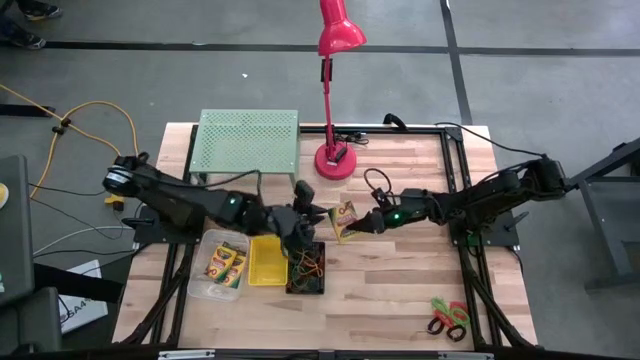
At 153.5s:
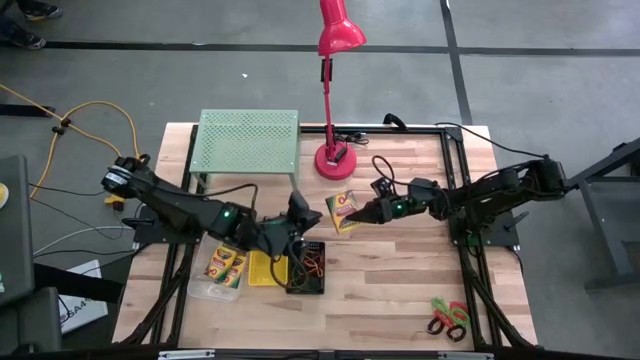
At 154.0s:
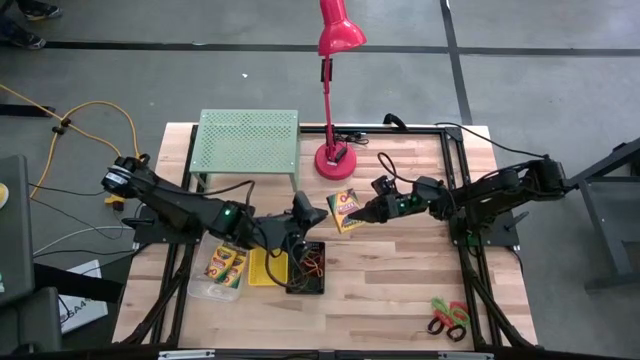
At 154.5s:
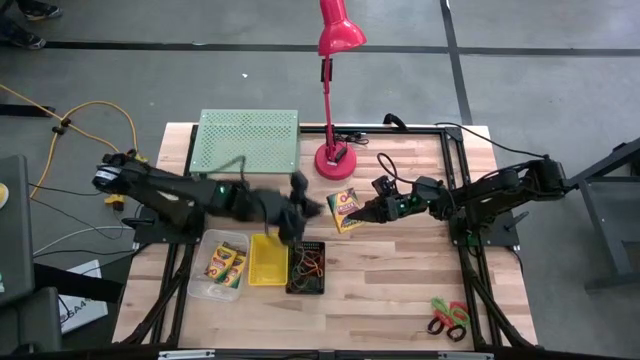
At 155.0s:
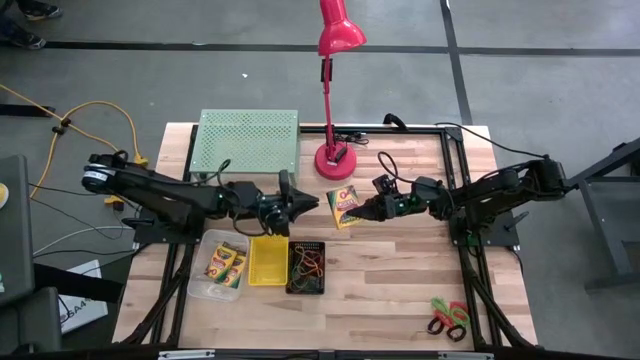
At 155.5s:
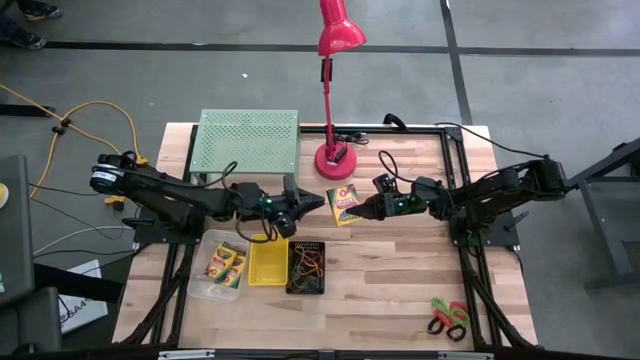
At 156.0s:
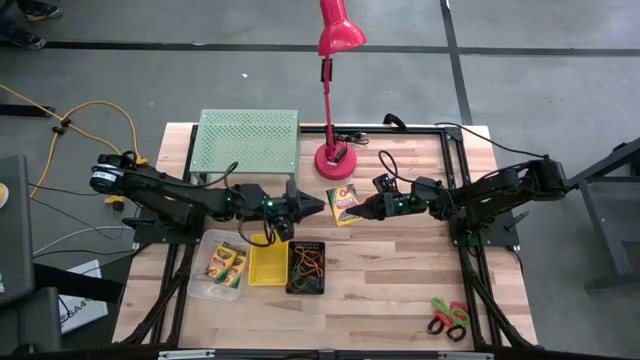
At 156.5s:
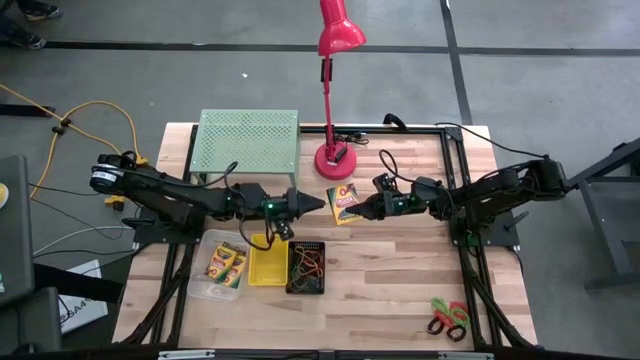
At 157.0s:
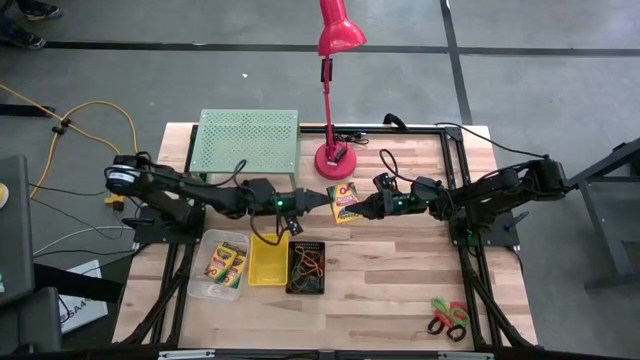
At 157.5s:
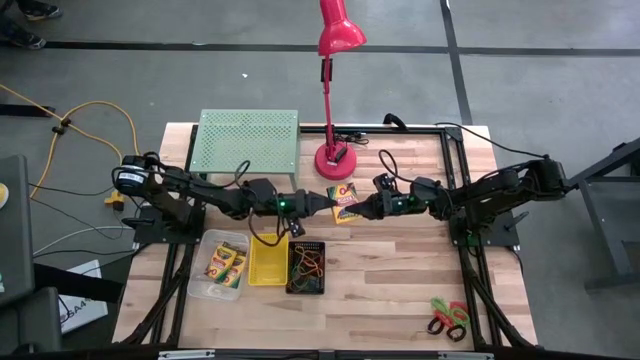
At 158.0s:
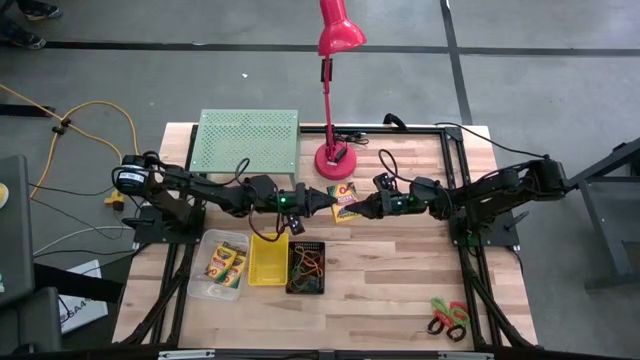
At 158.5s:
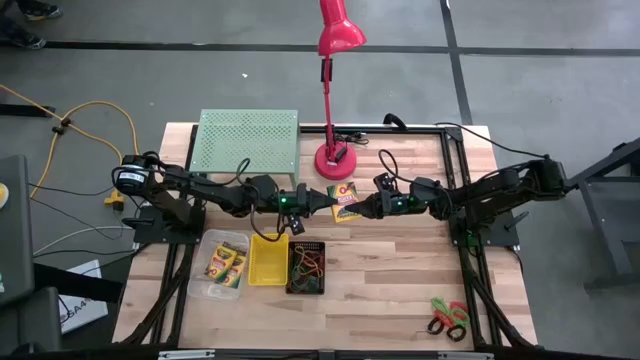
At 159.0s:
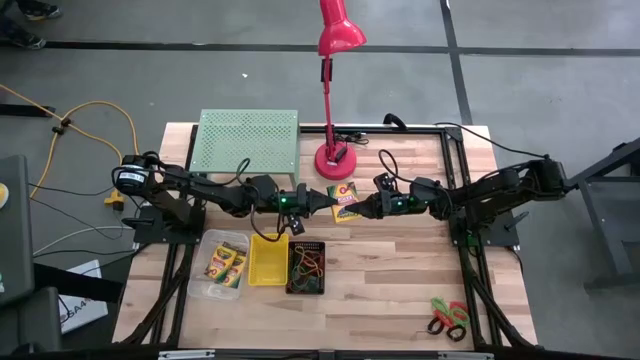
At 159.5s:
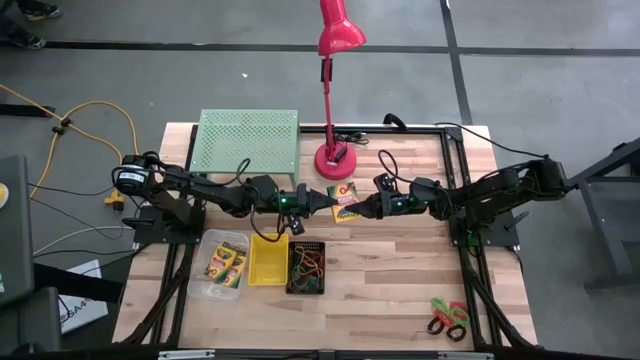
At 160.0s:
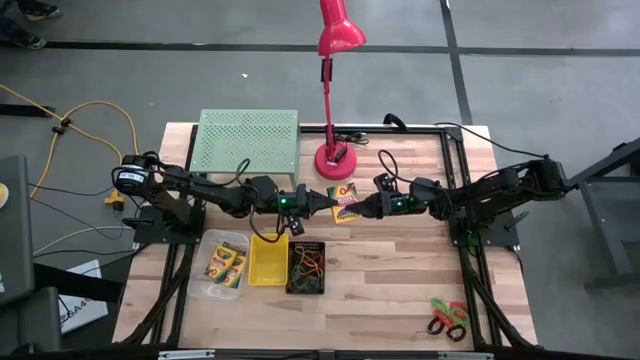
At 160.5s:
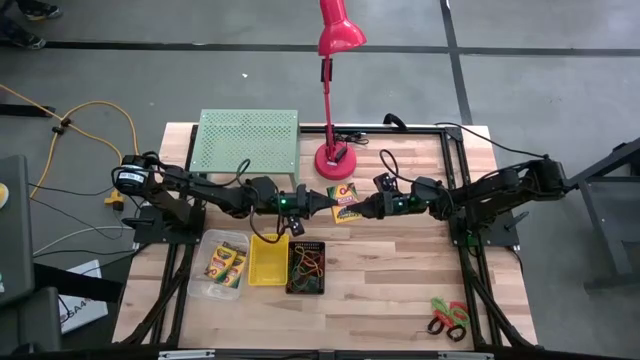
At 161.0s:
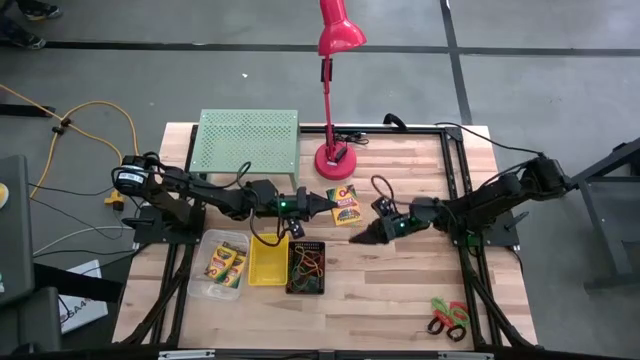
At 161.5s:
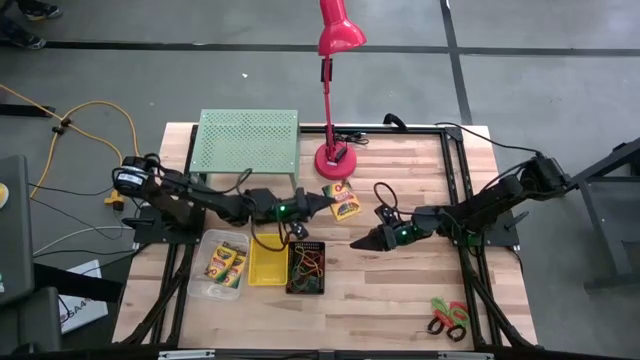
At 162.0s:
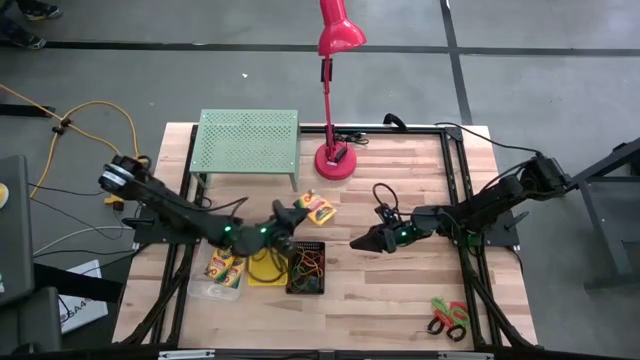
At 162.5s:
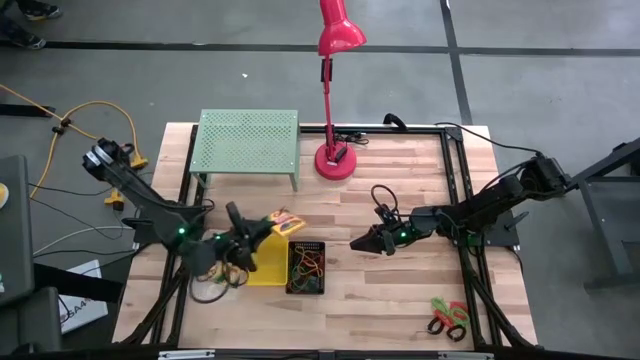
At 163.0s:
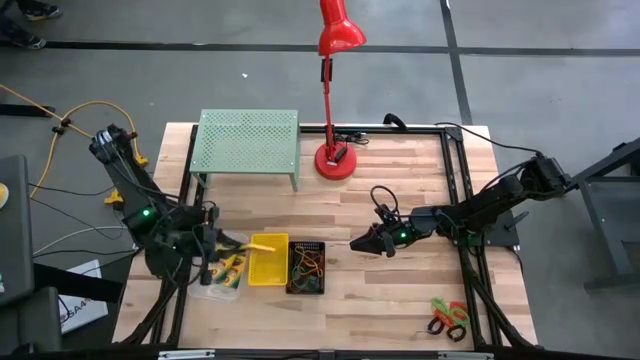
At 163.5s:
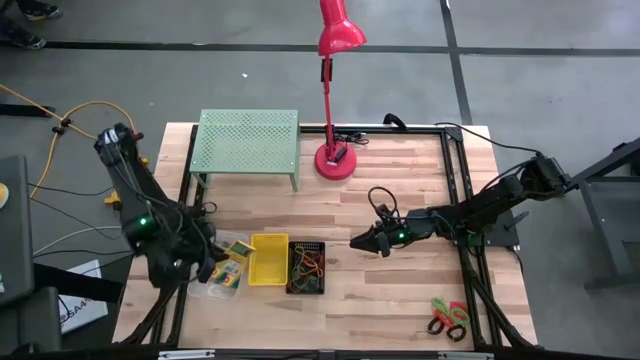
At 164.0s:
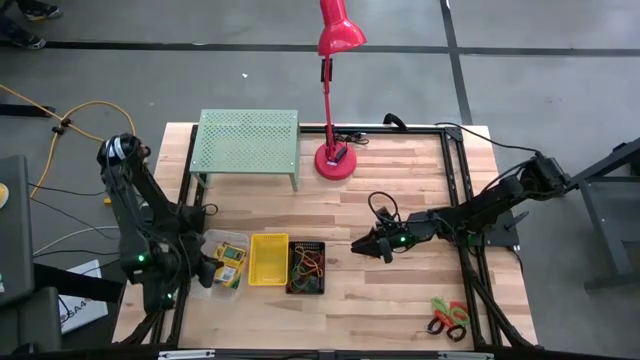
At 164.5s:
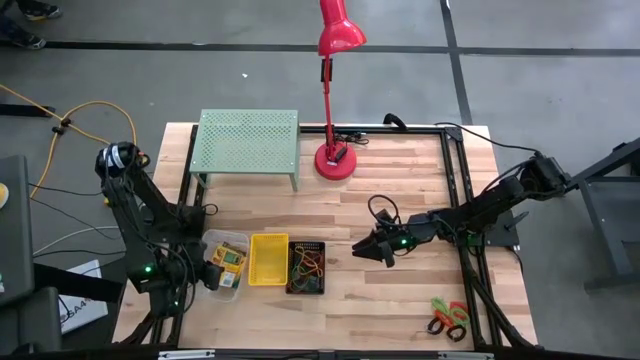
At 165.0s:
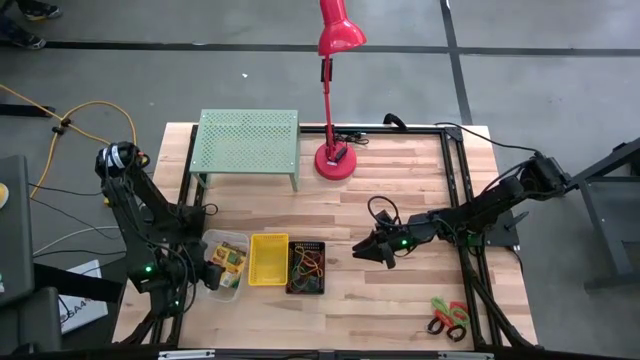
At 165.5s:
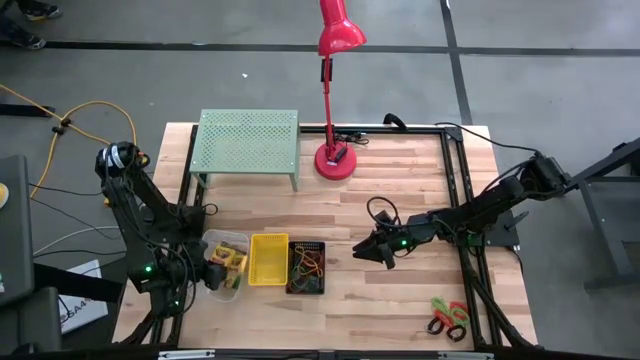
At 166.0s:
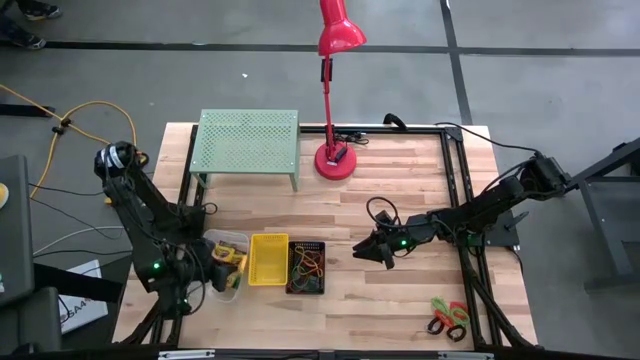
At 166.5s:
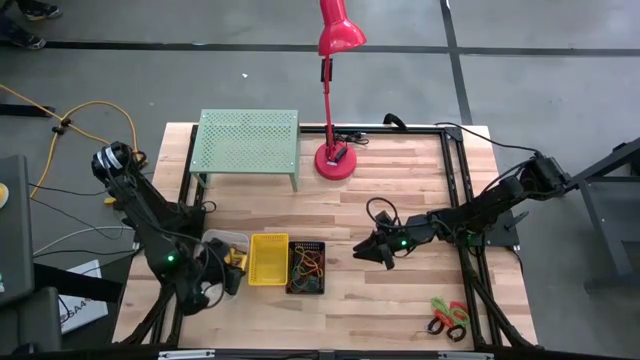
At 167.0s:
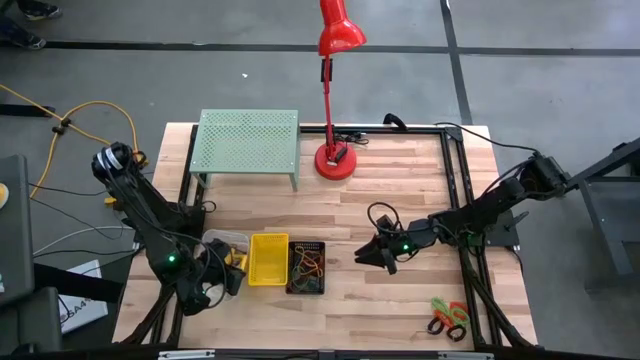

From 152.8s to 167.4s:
Task: Pick & Place Office Desk Supplies
Put the crayon box into the transparent box

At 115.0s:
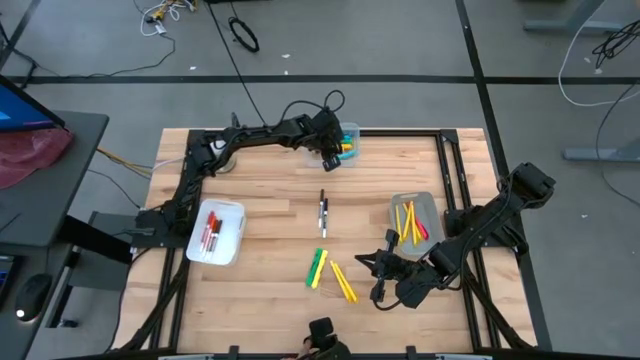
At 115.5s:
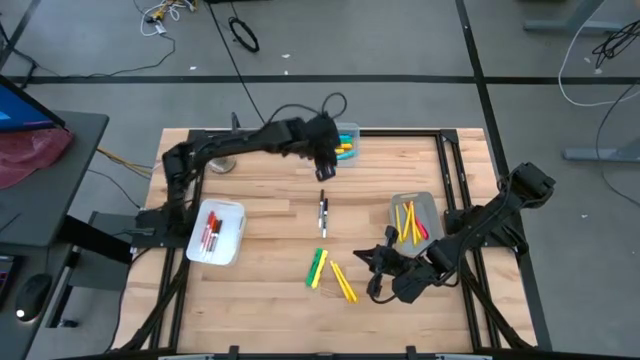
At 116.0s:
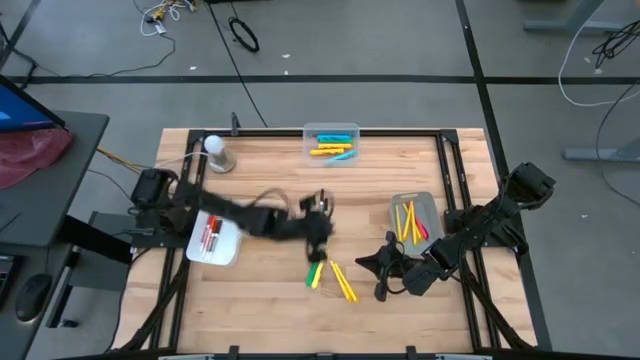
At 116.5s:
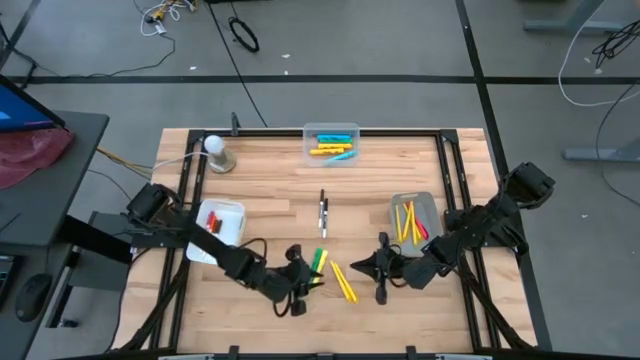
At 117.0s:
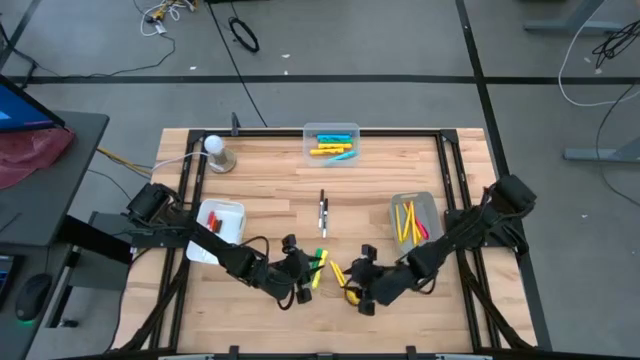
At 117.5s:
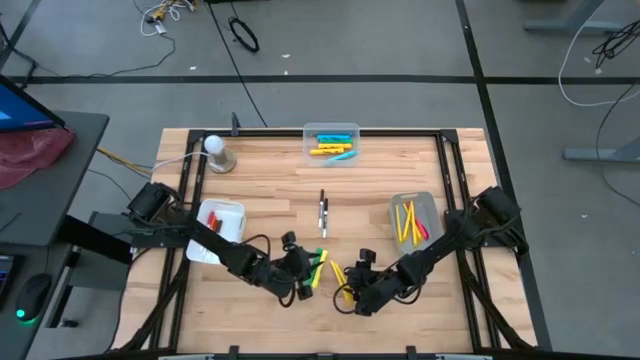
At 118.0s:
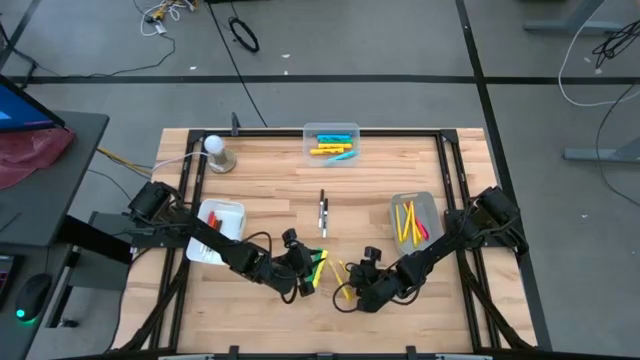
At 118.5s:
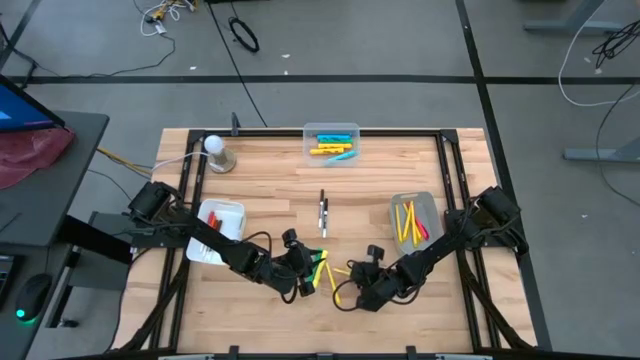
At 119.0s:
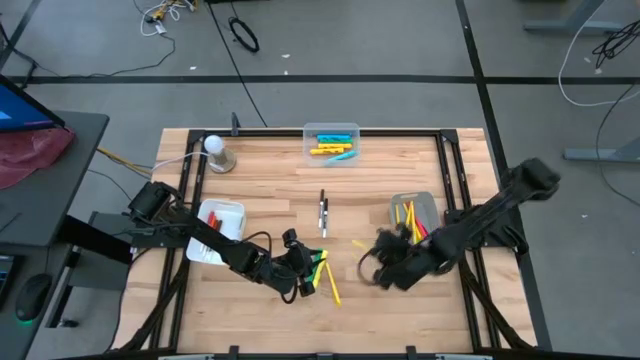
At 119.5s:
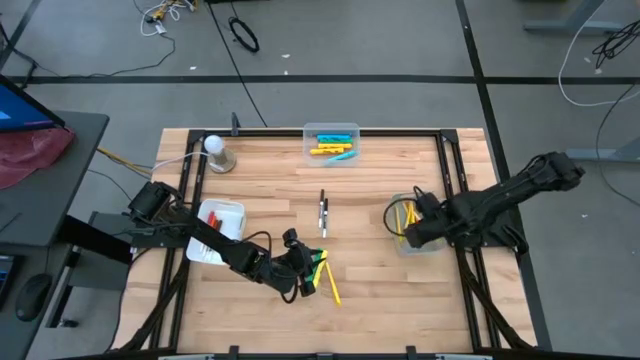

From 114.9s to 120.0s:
Task: Pick & Place Markers
Put the yellow pen into the gray bin

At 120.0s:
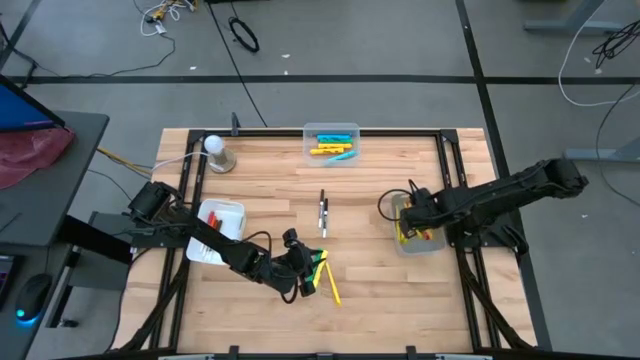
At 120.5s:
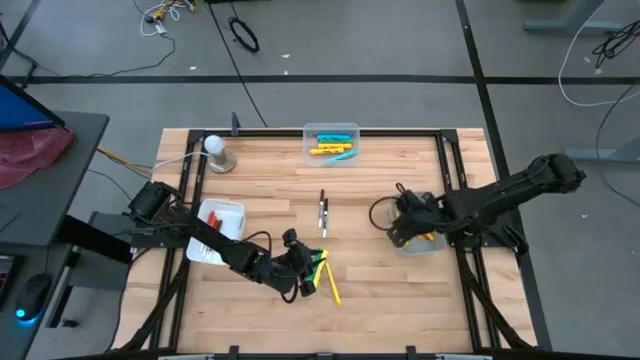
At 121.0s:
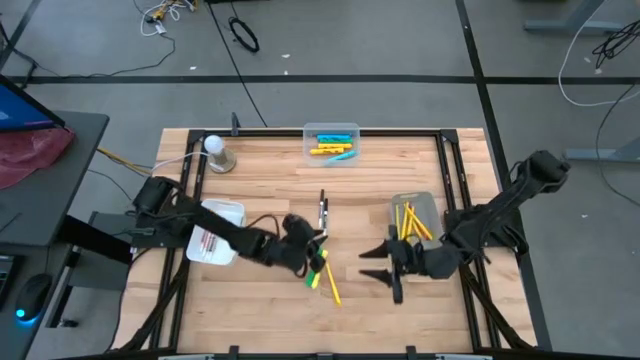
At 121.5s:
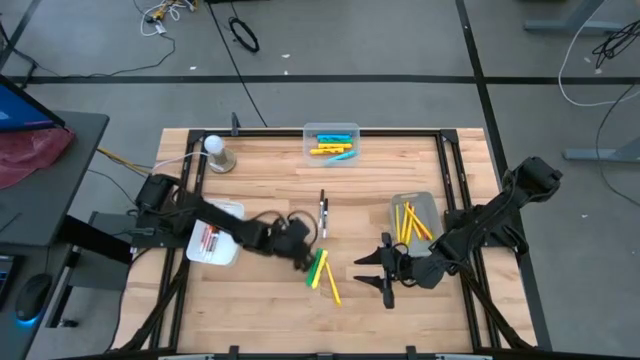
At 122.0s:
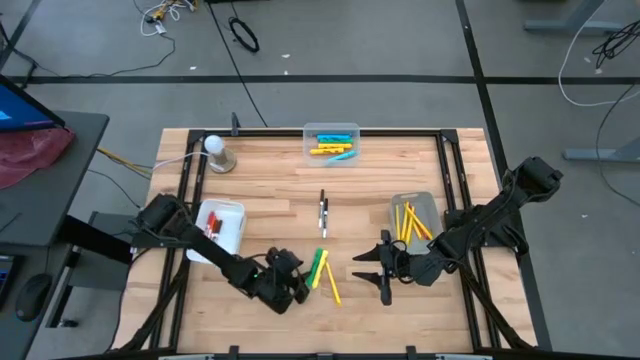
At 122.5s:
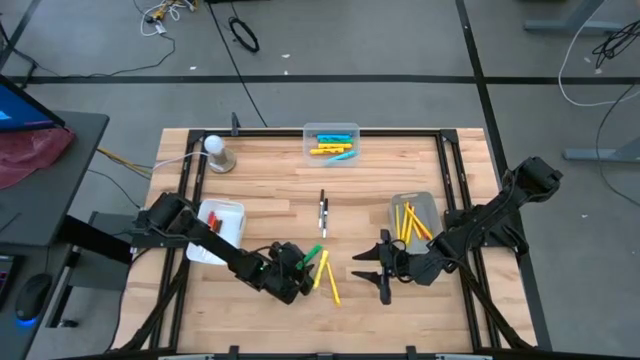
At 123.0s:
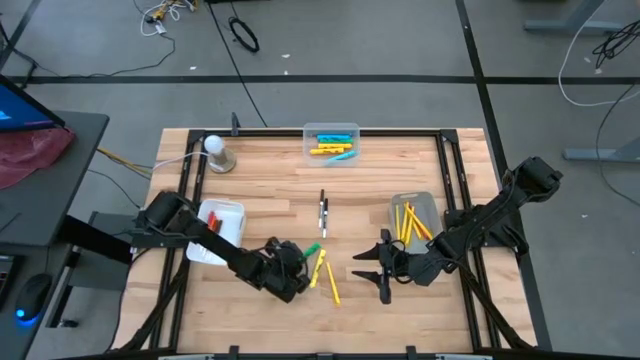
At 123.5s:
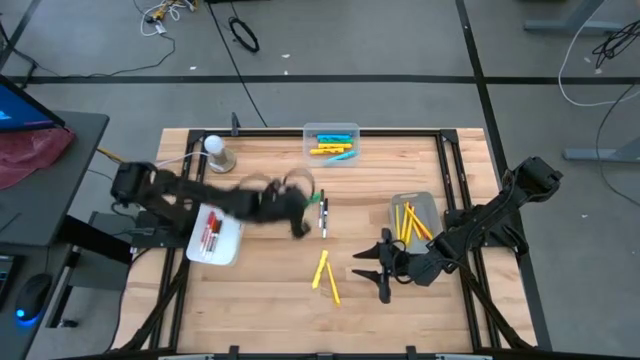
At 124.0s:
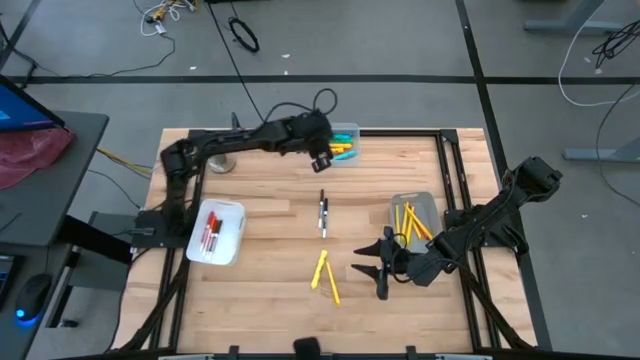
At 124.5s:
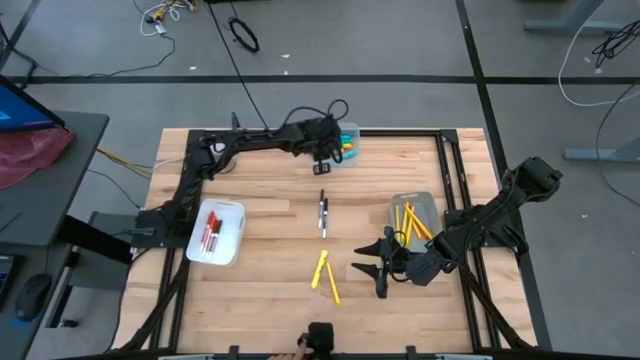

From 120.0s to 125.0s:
Put the green highlighter pen into the transparent bin
